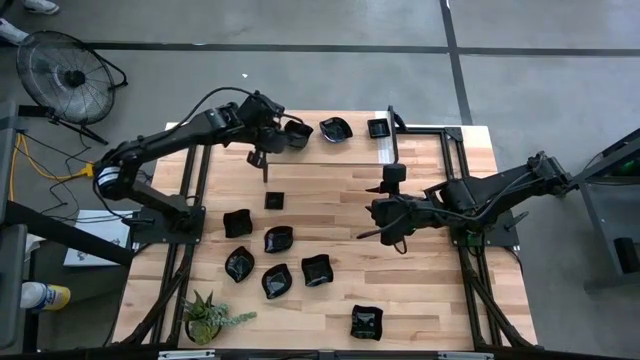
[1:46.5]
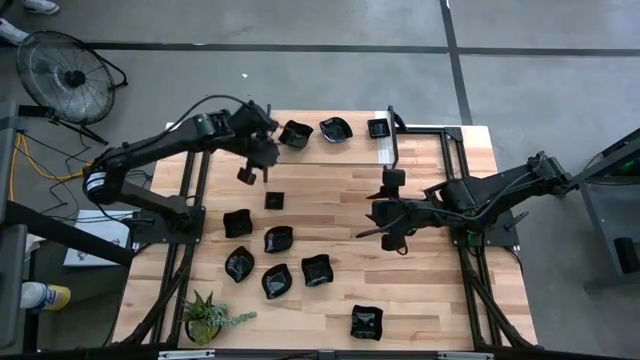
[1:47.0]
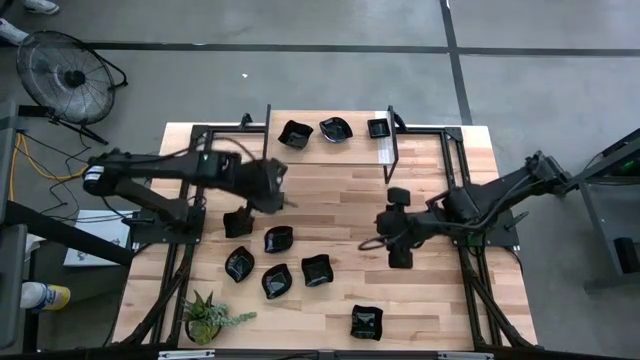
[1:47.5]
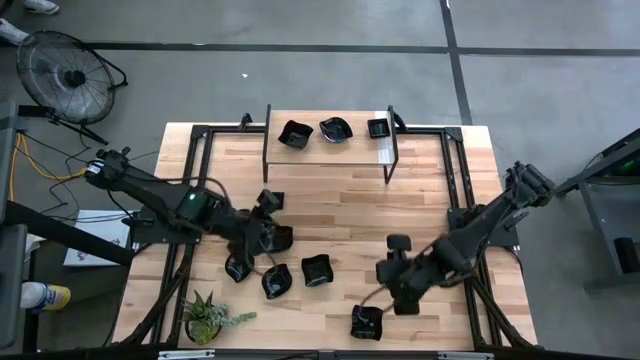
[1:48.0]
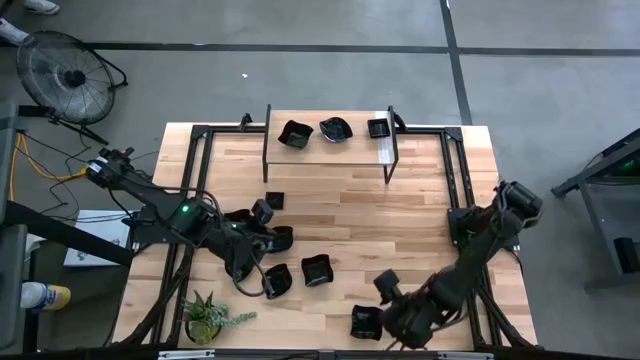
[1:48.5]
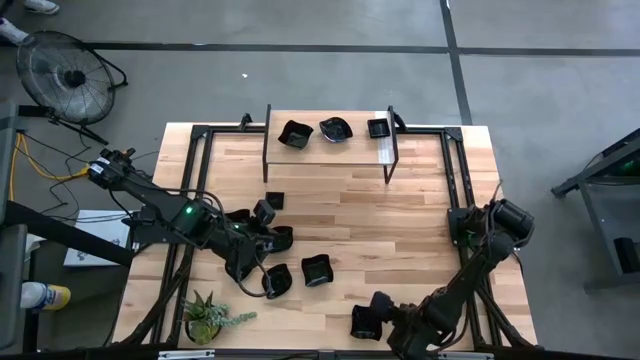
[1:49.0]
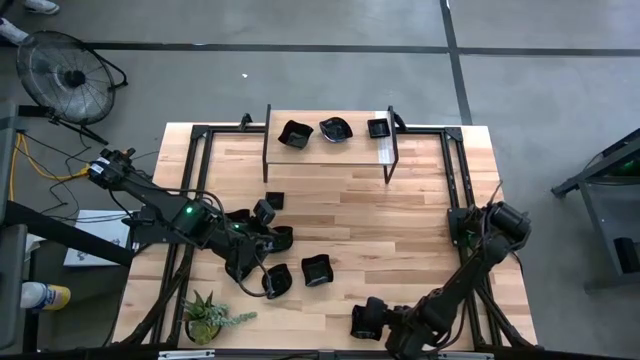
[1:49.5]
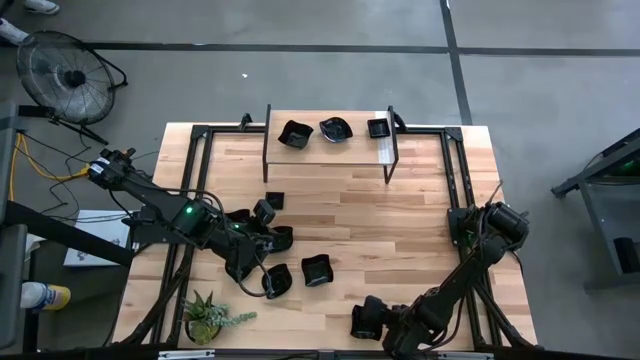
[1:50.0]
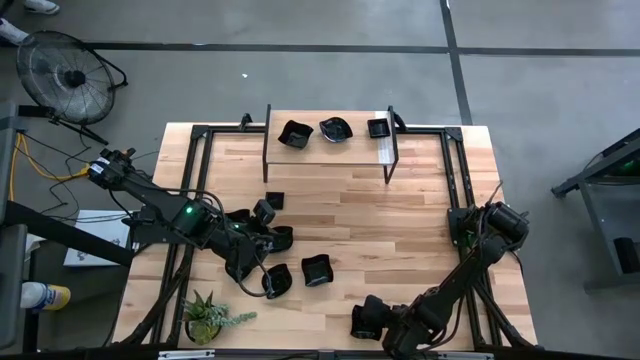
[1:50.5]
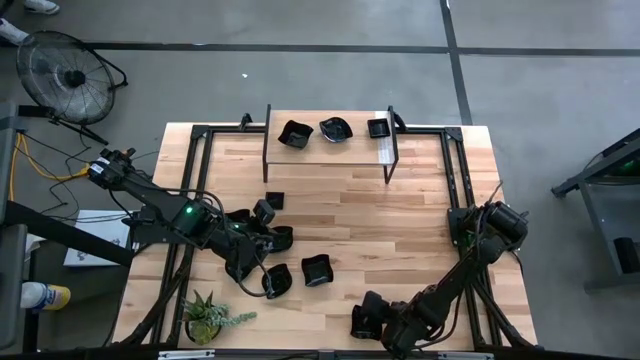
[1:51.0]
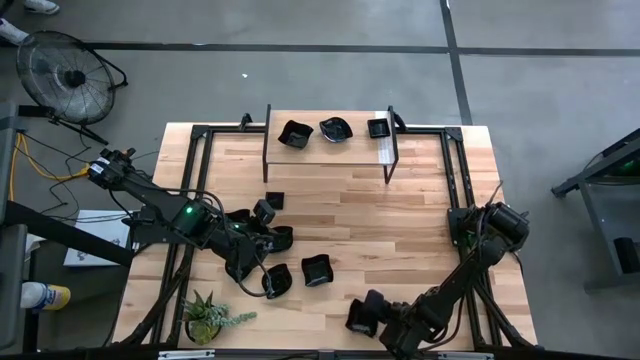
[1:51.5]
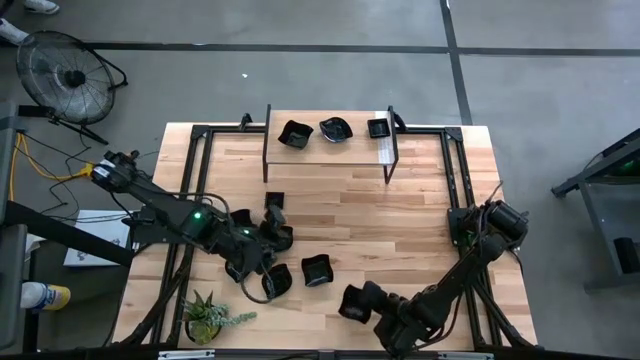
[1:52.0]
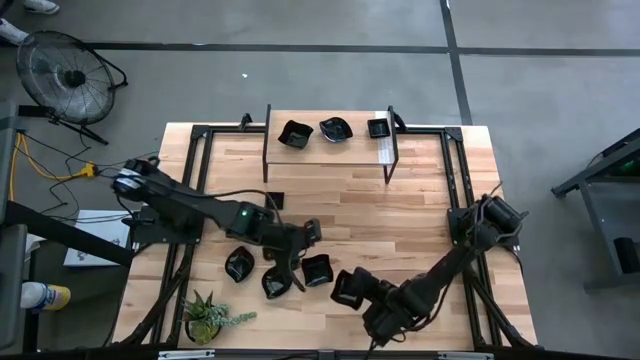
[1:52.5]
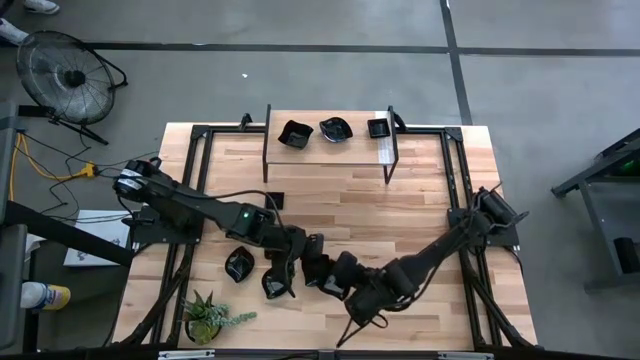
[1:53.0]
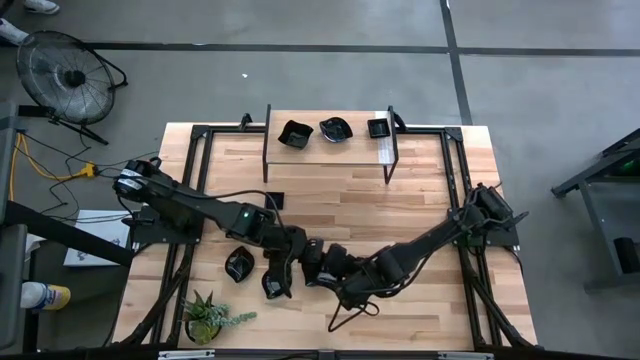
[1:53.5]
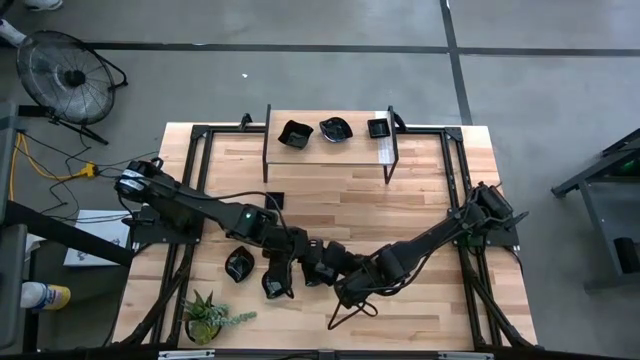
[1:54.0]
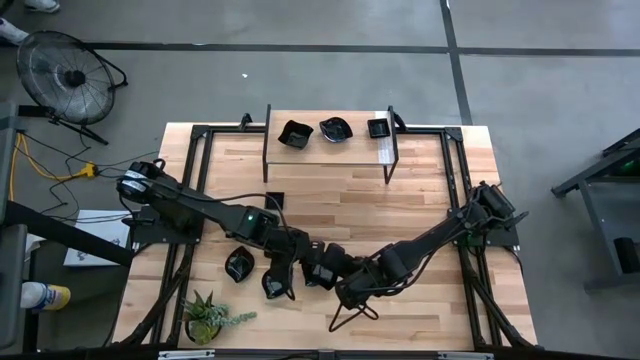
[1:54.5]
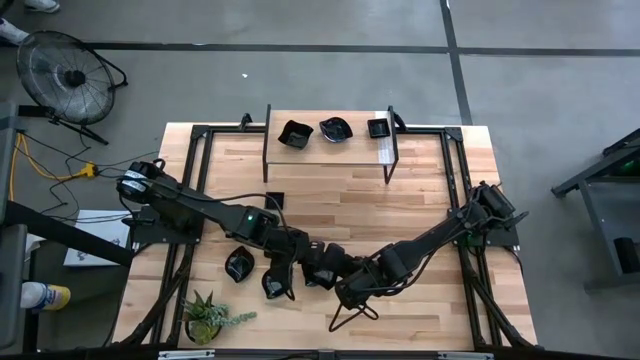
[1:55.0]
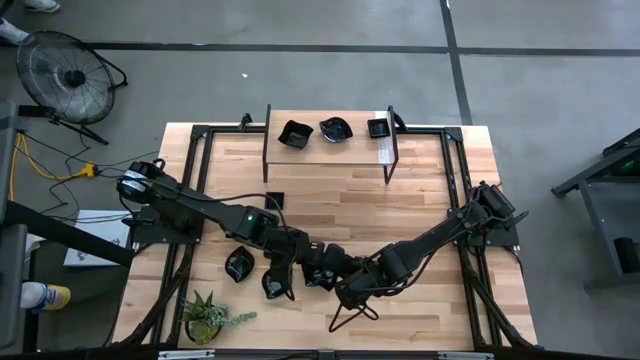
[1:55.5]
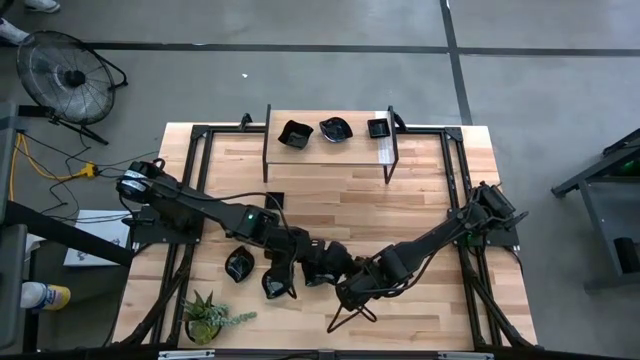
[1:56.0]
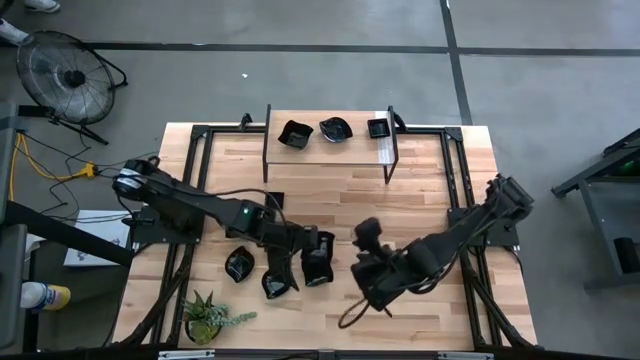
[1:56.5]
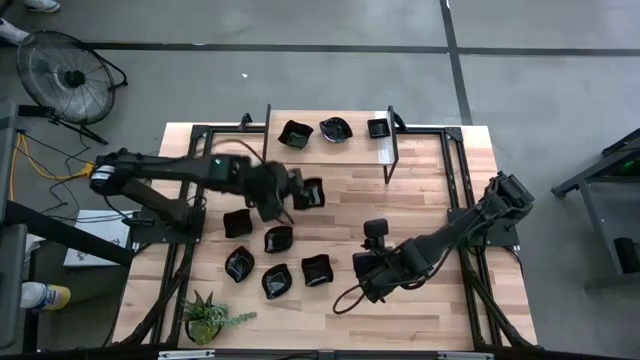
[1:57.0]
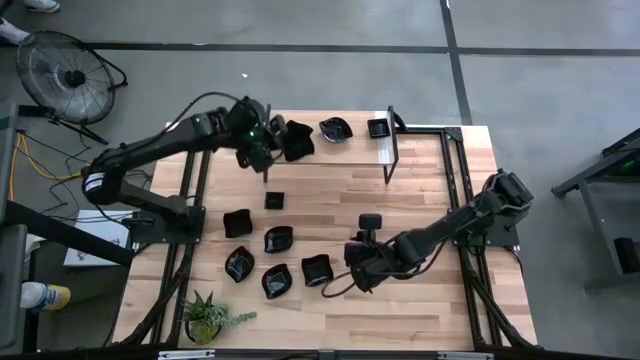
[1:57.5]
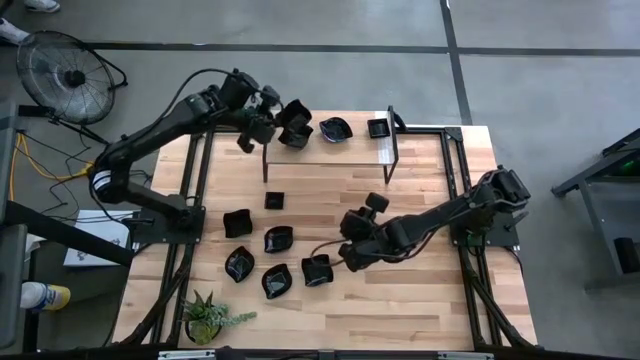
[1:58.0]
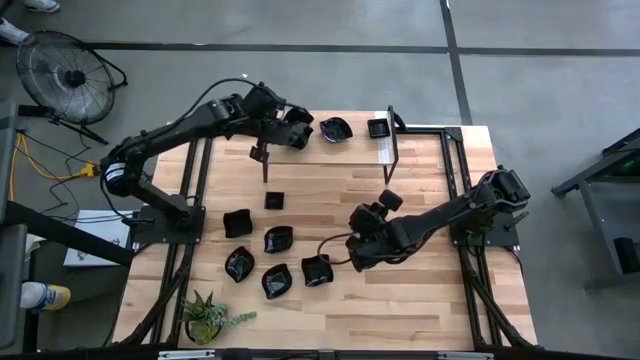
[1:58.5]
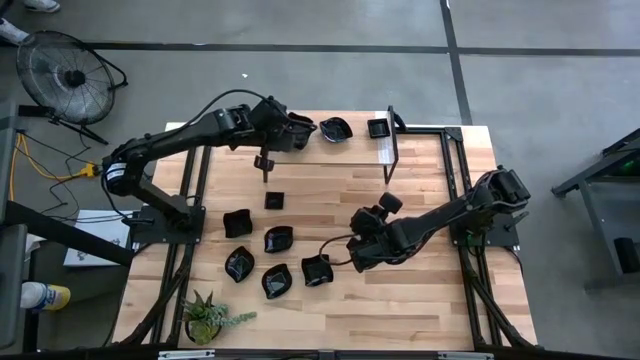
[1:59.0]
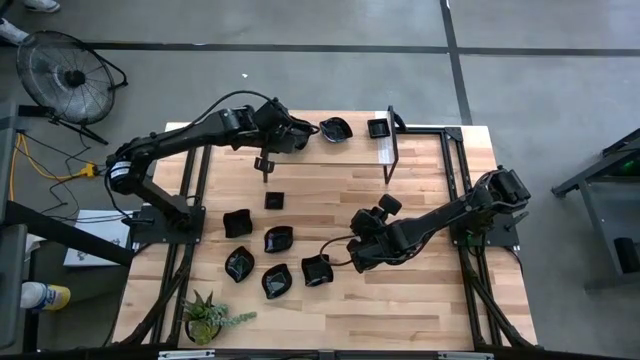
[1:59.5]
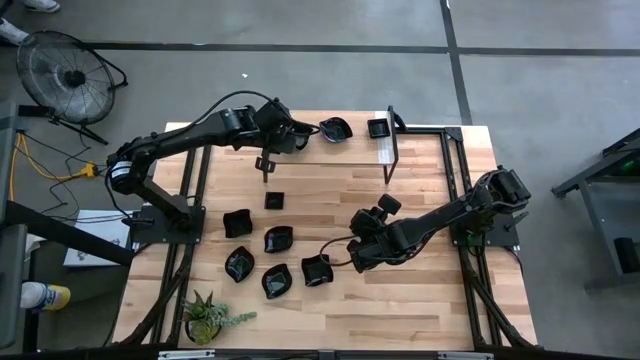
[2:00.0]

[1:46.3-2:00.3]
Task: Pick & Place Mini shaped plates
Stack the black distorted square plate on top of the black distorted square plate on the shelf

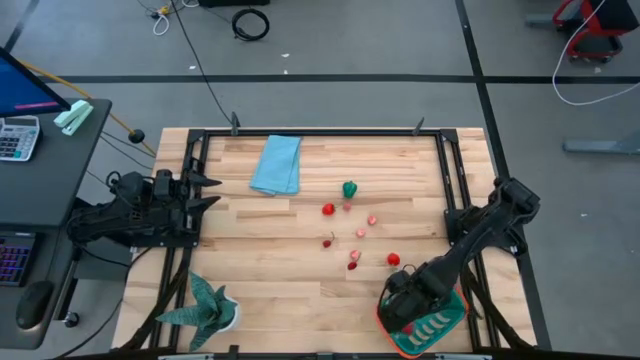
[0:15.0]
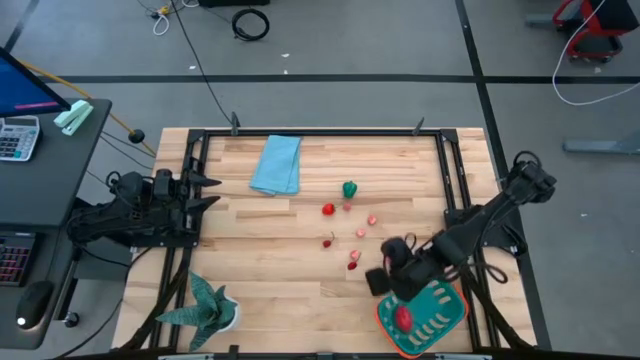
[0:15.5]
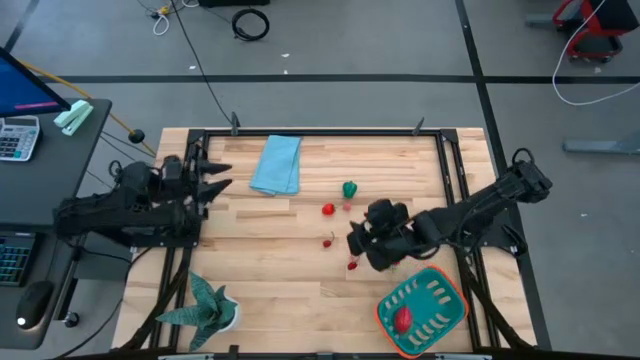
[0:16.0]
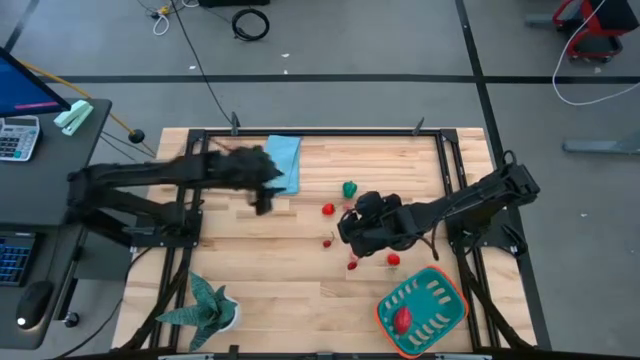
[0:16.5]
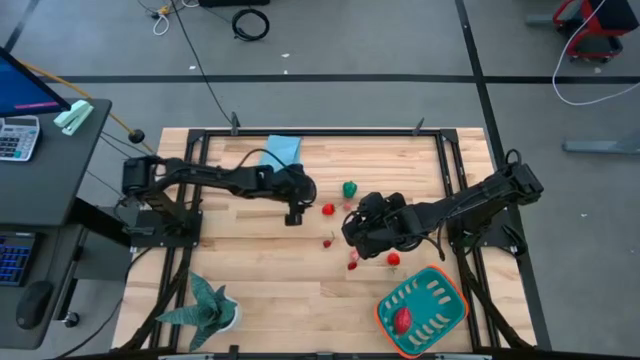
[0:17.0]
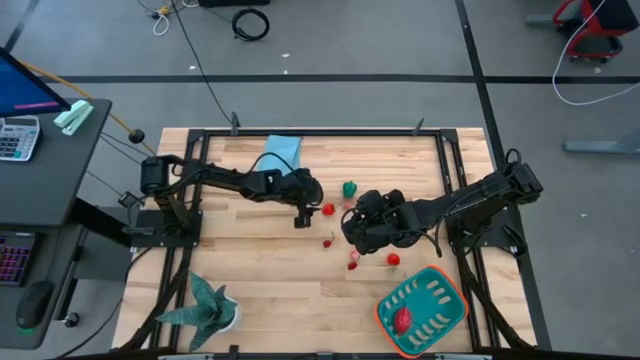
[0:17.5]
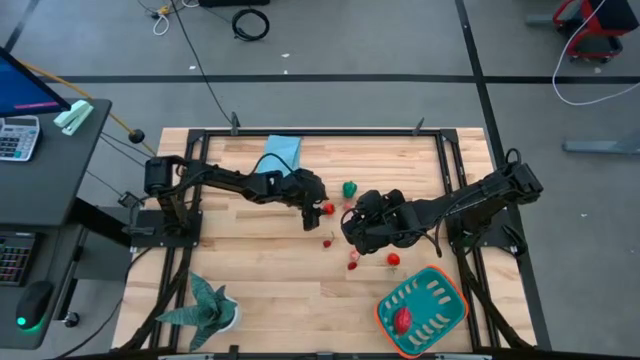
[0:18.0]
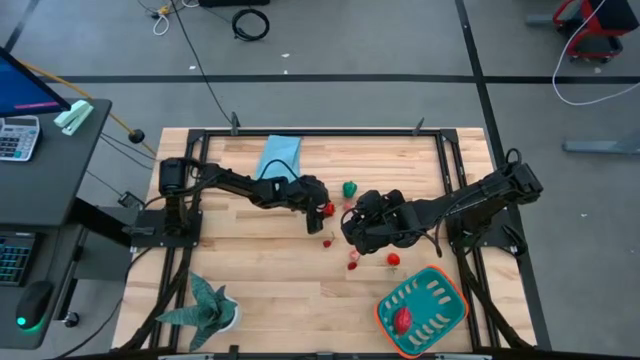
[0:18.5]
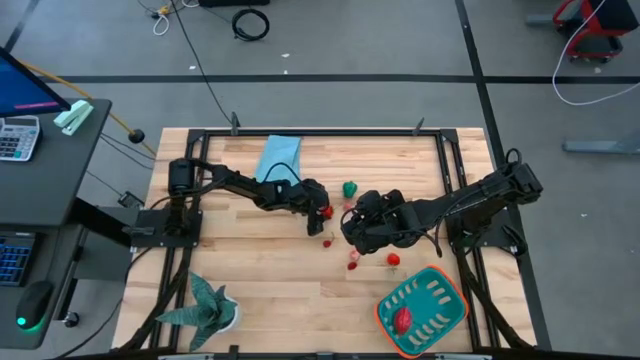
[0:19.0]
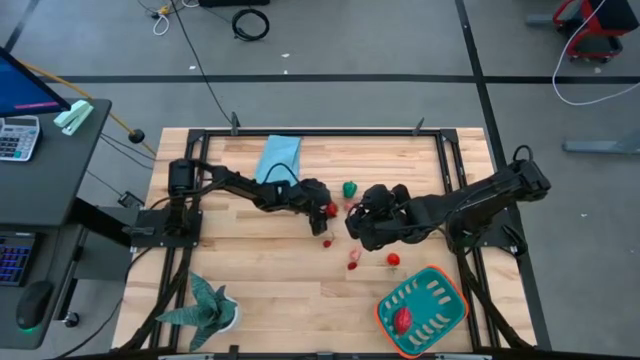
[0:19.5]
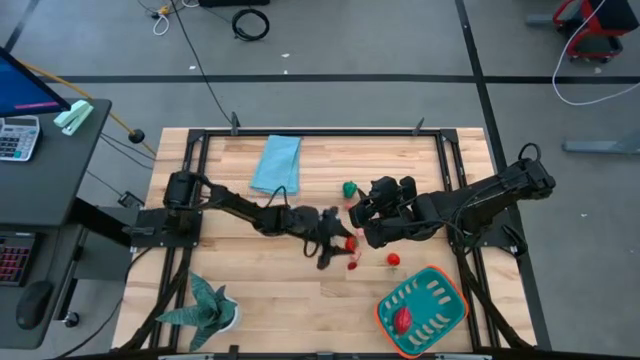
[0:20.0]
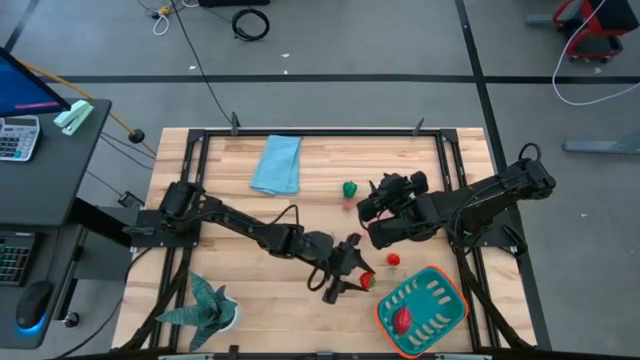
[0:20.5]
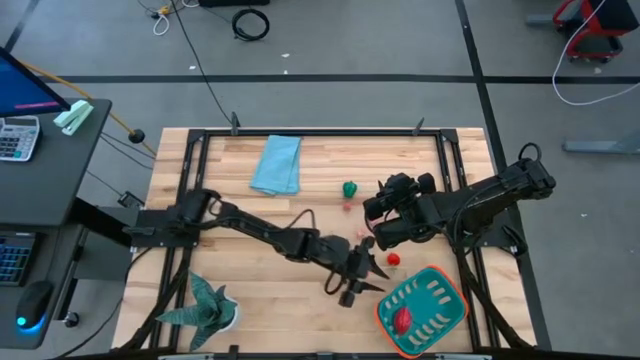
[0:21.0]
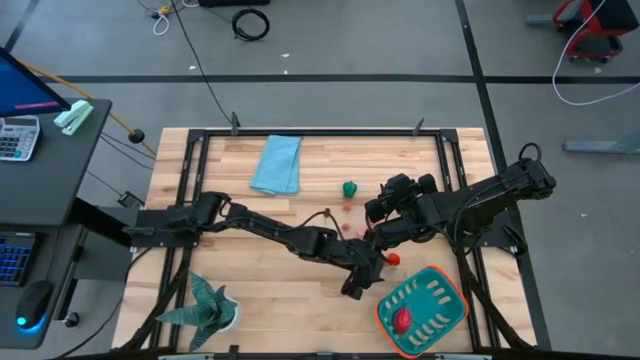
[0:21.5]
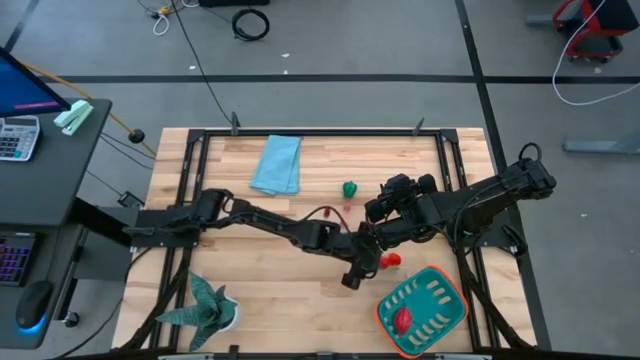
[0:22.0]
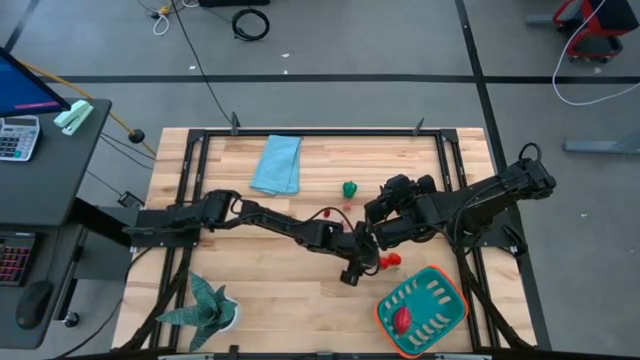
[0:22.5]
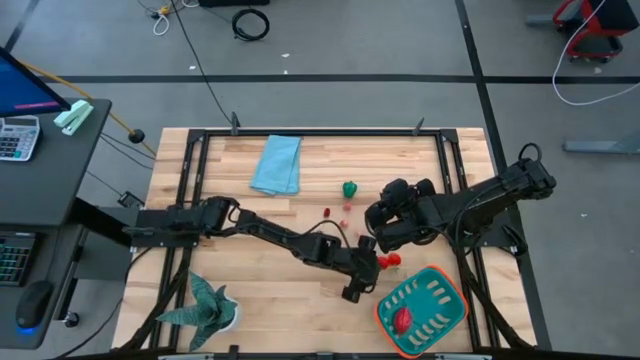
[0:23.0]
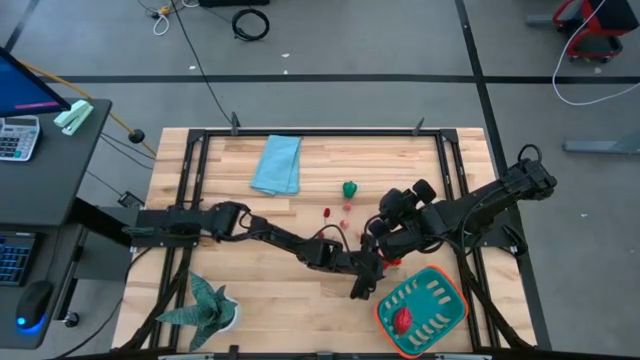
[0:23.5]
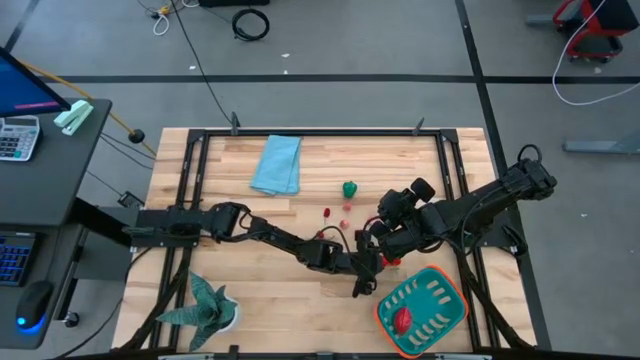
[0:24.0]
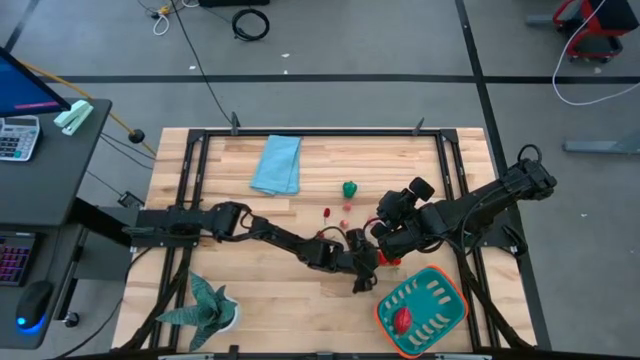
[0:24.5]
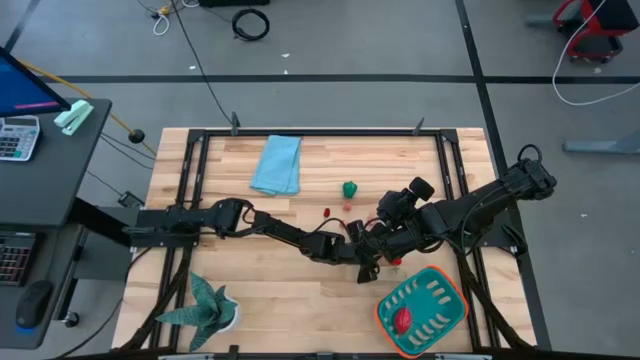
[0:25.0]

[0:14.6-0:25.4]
Task: Pick and placing Produce into tupperware
Put the red strawberry into the blue basket
